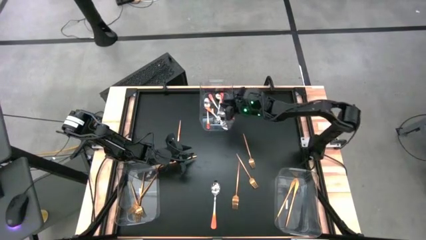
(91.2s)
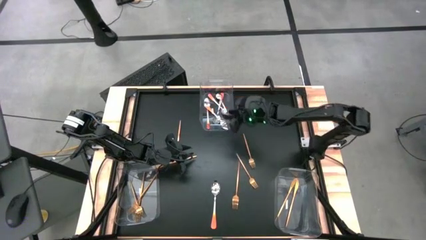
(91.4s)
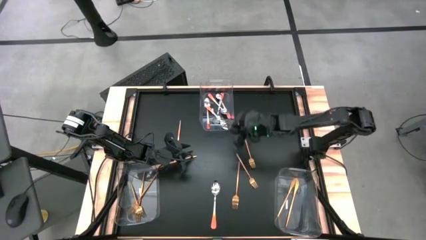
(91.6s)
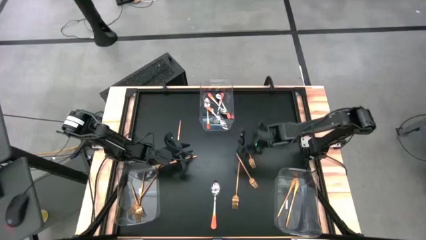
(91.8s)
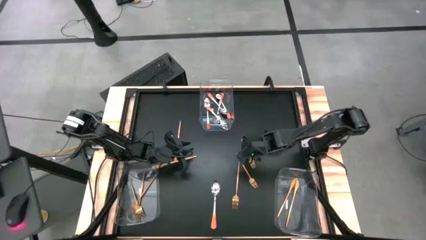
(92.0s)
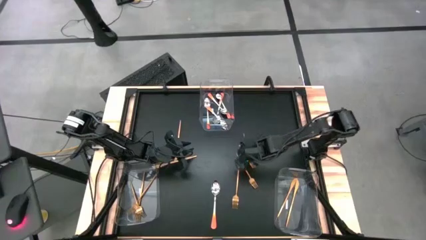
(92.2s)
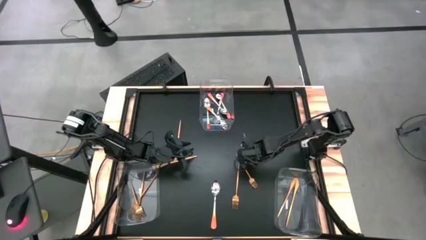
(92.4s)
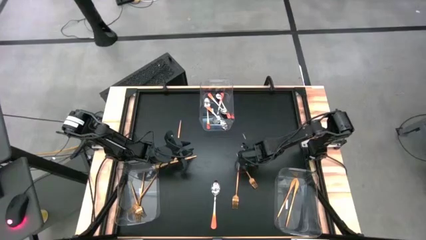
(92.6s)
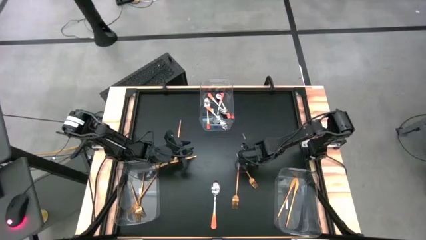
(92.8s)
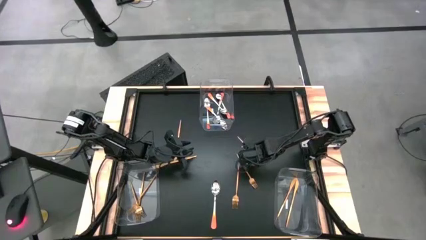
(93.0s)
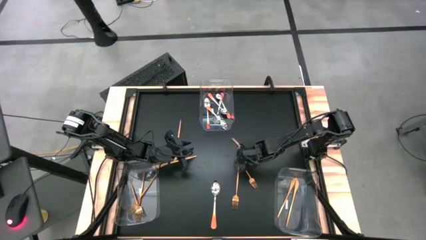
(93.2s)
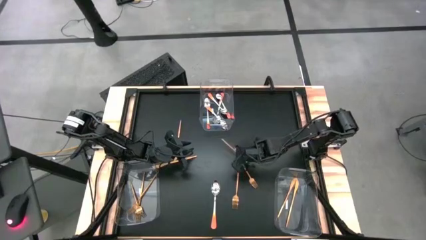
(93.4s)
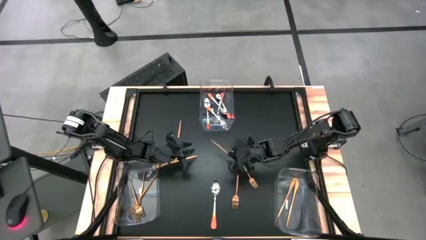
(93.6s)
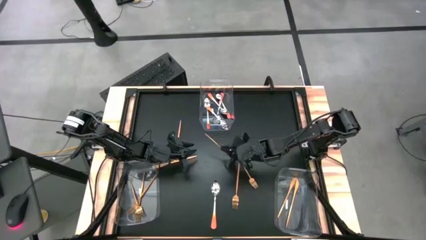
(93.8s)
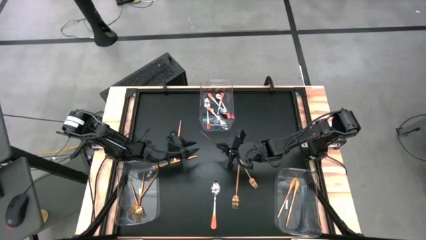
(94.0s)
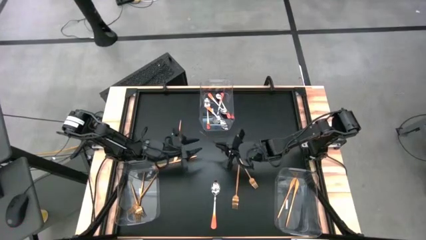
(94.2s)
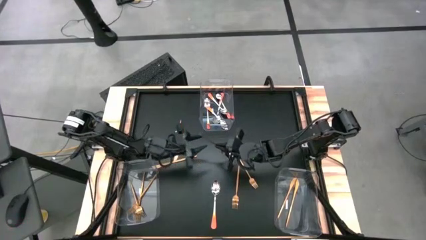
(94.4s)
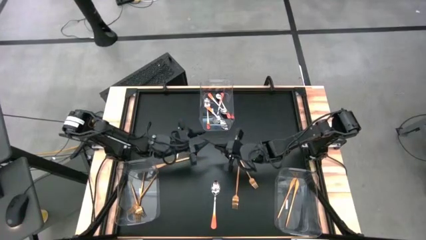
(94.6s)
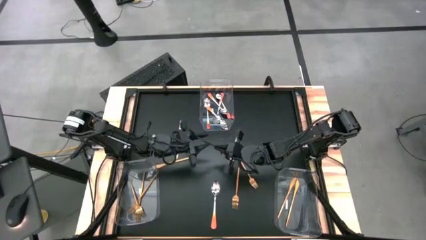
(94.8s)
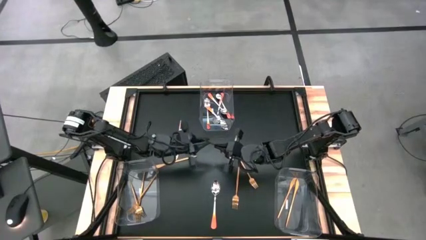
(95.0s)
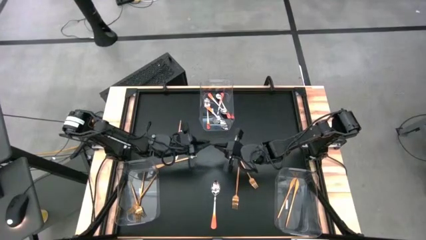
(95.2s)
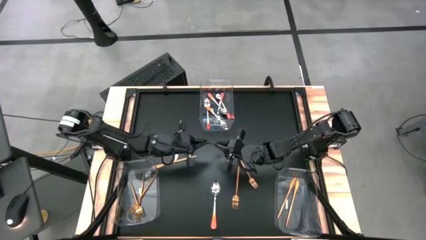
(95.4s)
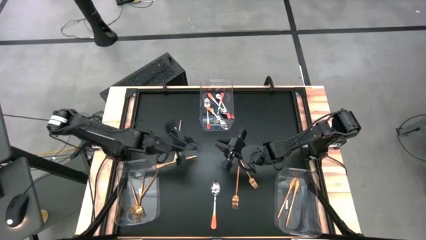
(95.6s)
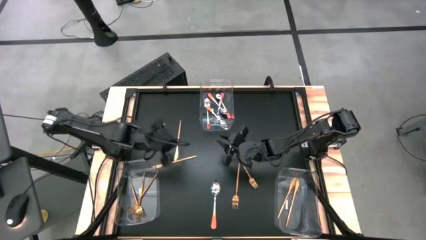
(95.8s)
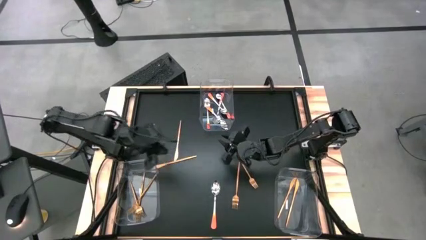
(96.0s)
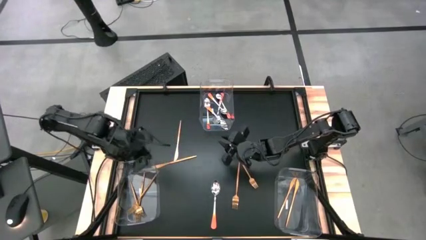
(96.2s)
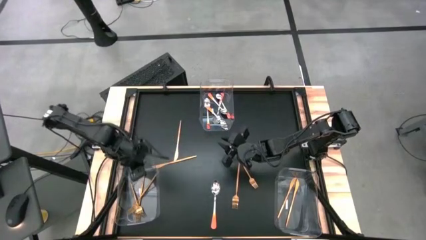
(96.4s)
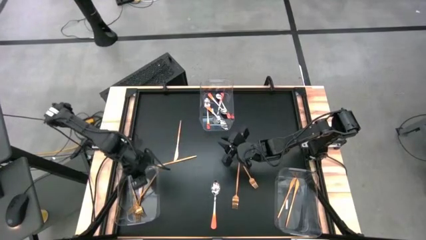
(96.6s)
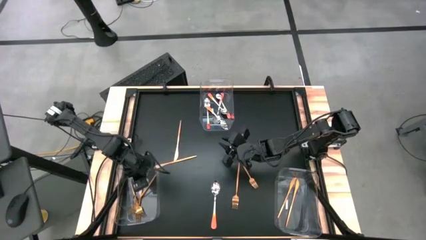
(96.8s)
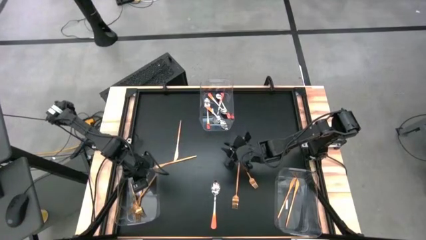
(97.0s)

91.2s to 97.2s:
Task: Sort silverware by color (type)
Put the gold fork into the bottom left transparent bin

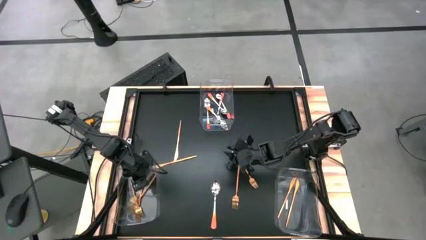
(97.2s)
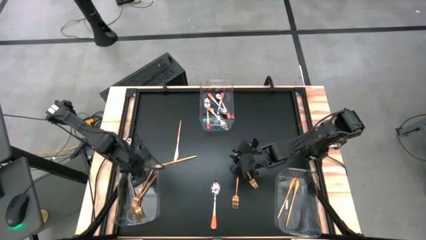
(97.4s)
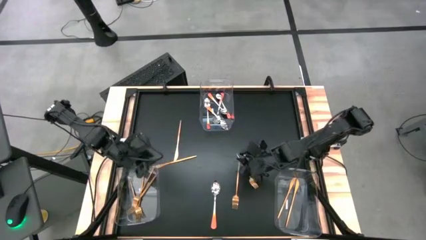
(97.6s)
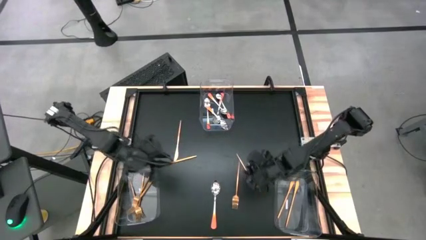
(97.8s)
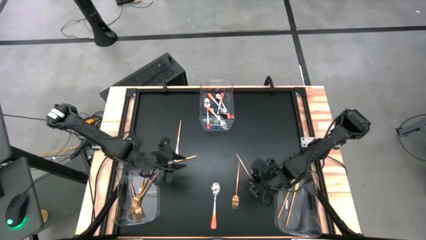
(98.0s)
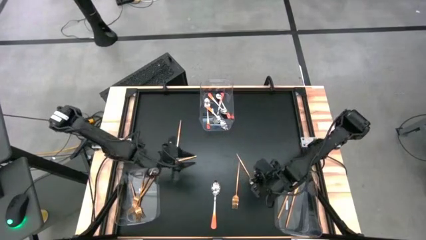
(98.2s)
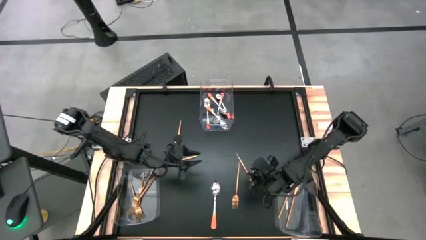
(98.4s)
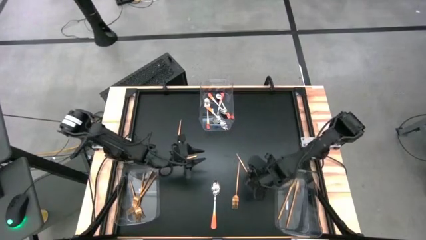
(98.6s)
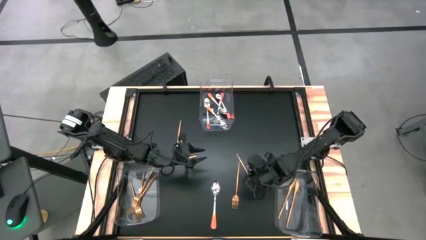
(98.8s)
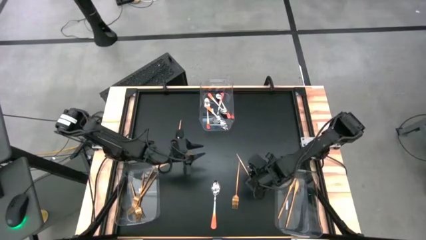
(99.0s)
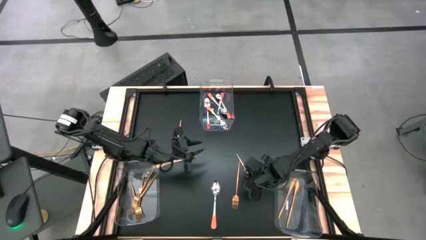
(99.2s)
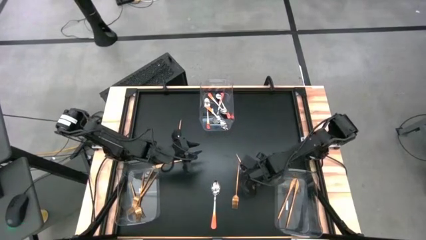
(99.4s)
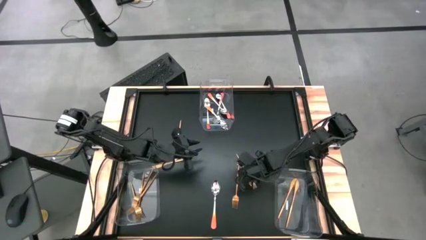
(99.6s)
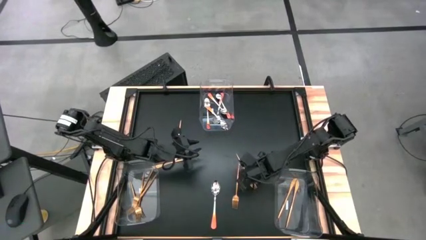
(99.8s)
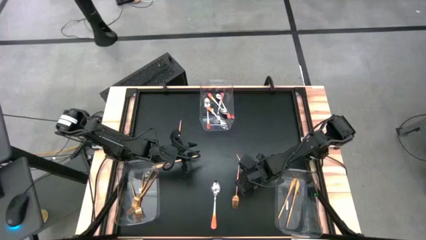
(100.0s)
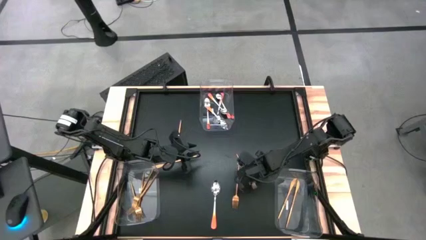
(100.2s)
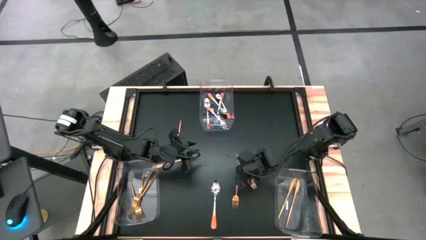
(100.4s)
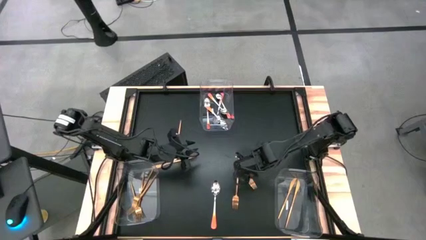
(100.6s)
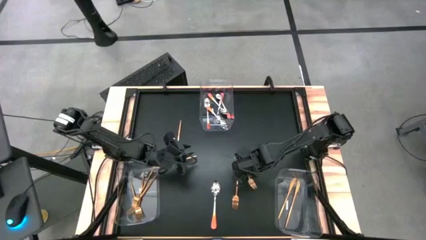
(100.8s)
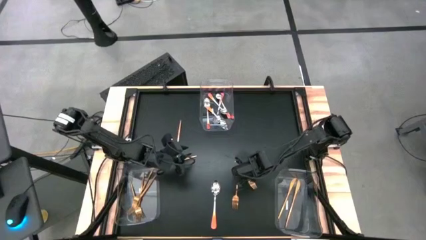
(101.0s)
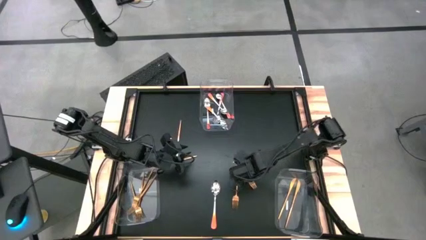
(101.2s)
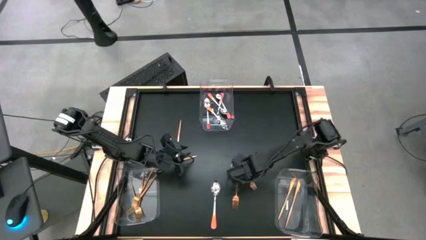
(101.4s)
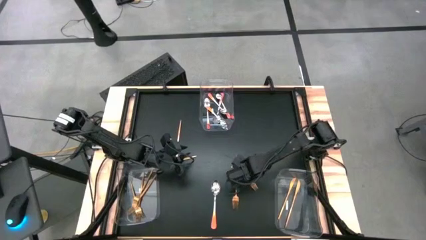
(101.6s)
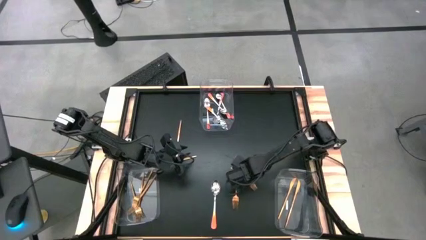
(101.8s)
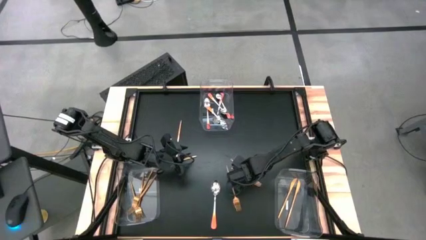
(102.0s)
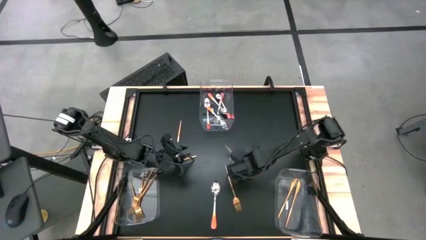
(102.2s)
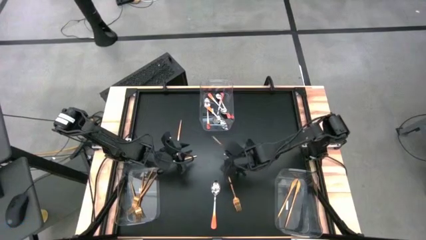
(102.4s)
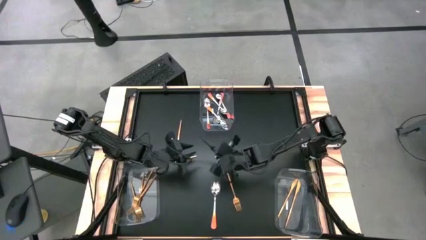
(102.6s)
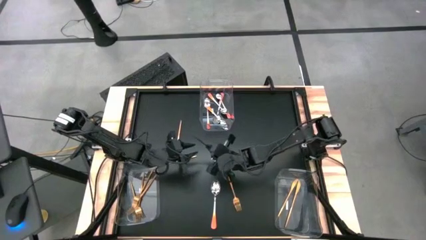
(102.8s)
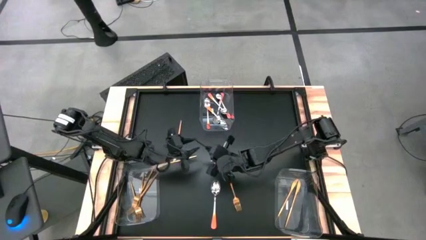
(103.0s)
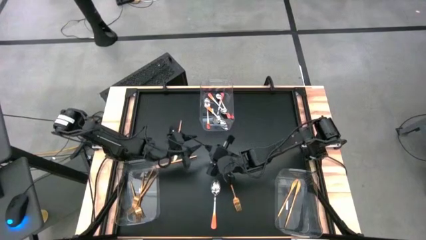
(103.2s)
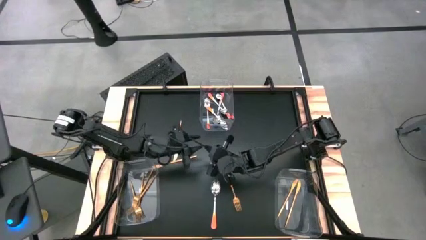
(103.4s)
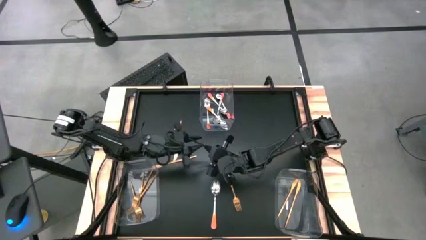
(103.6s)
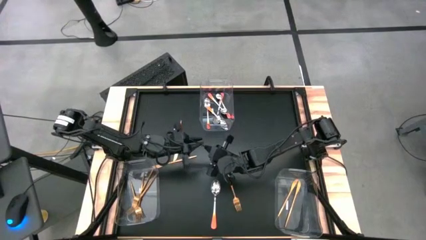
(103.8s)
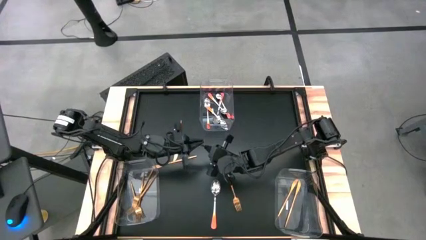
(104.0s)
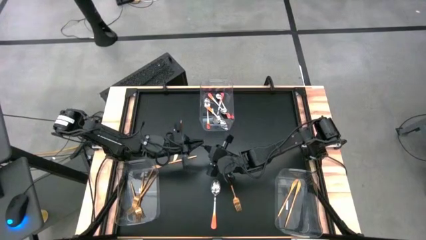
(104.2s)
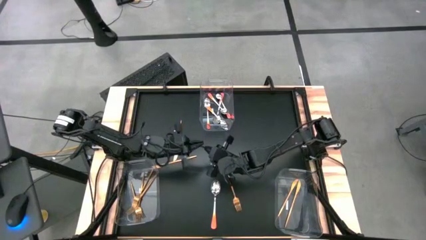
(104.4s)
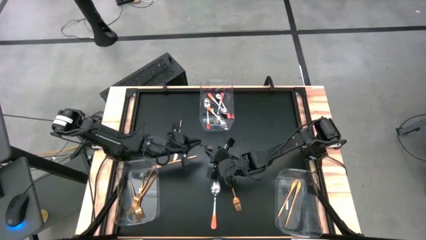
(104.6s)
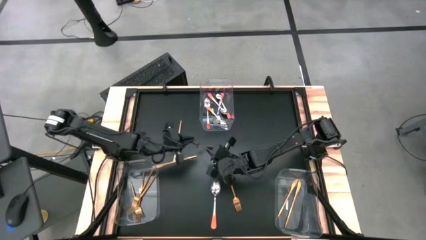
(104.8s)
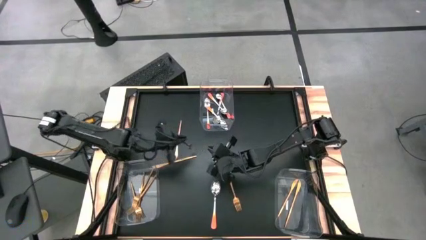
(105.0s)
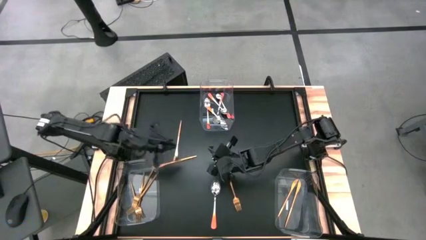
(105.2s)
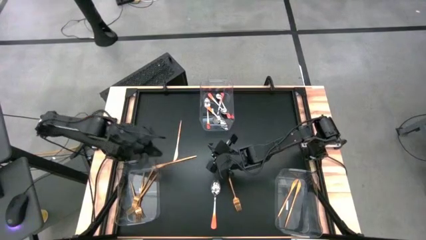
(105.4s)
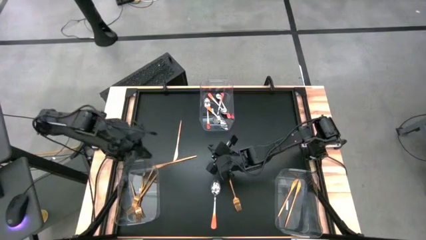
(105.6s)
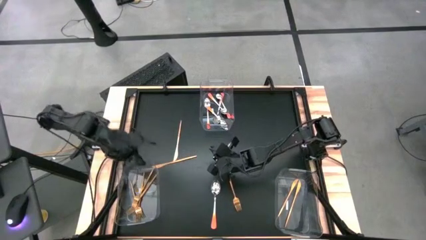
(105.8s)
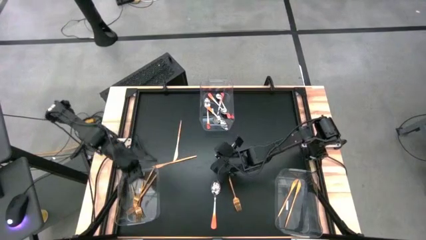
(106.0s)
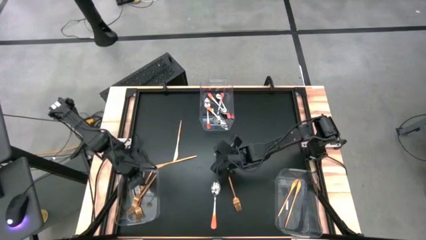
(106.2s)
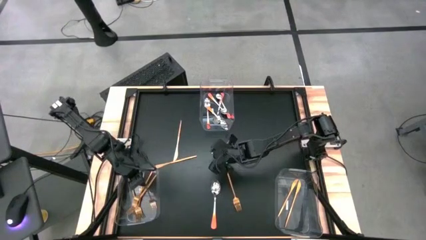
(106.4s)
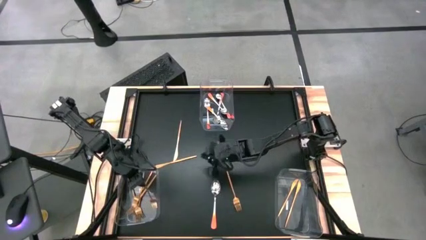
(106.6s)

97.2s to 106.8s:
Put the gold fork into the bottom left transparent bin

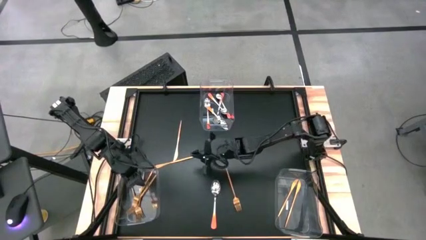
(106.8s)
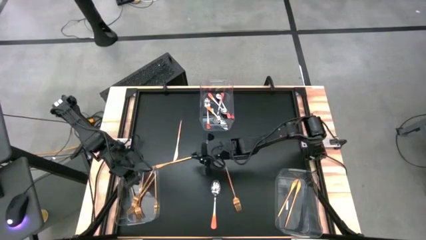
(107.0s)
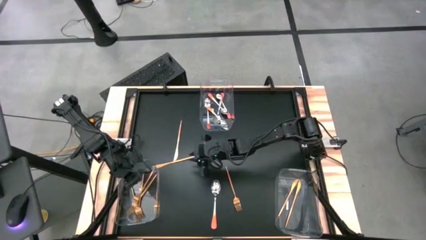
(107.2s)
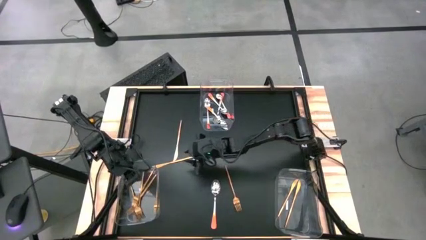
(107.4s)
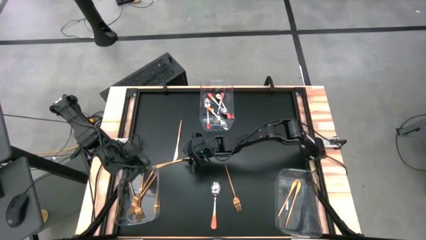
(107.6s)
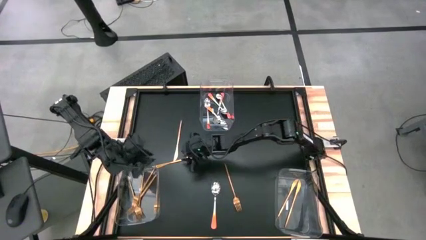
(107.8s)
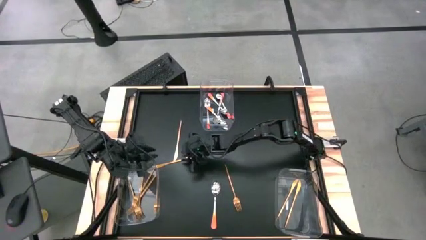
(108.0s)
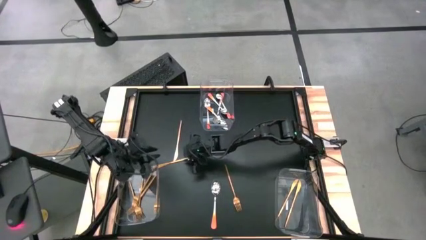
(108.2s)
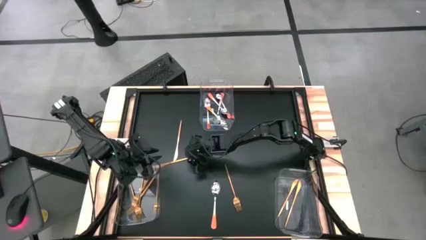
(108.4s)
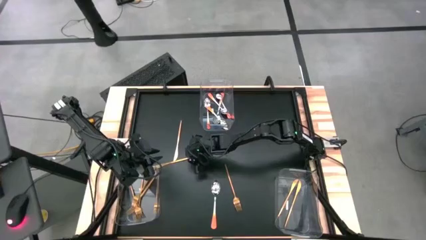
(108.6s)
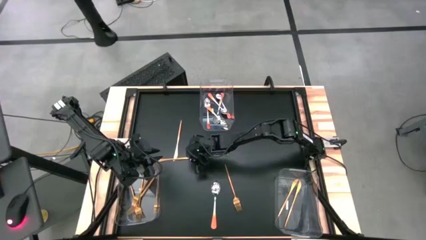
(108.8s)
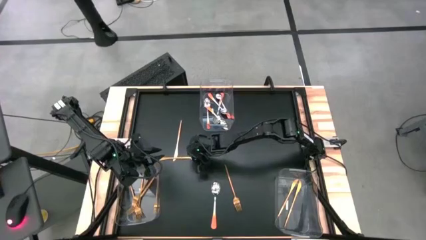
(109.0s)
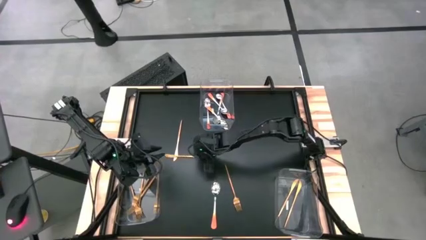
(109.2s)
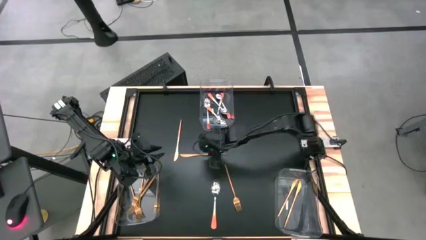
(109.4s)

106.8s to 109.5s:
Put the gold knife into the bottom right transparent bin
